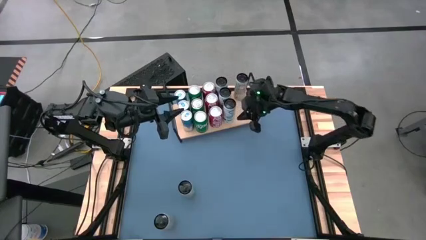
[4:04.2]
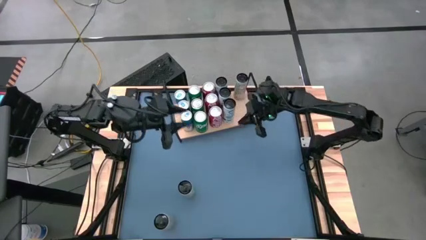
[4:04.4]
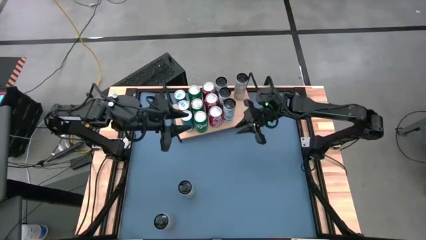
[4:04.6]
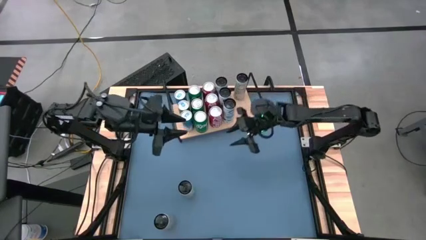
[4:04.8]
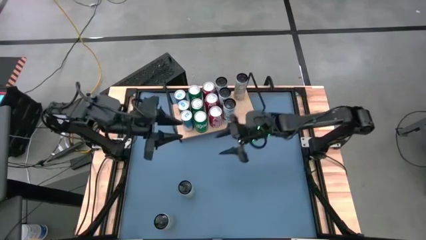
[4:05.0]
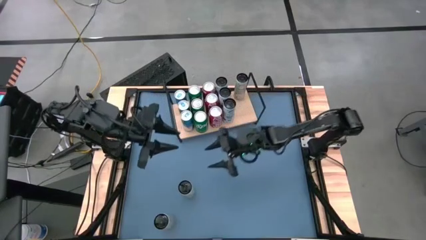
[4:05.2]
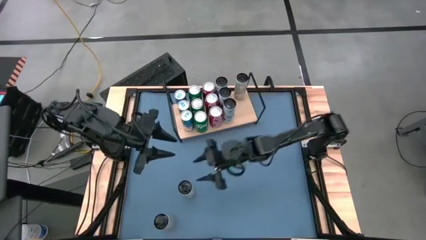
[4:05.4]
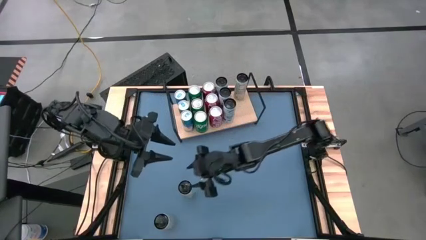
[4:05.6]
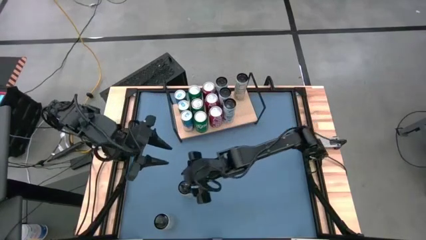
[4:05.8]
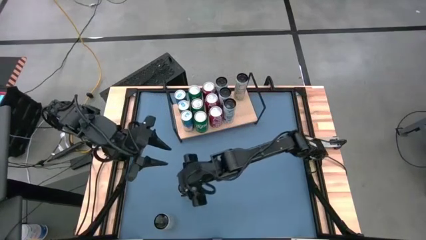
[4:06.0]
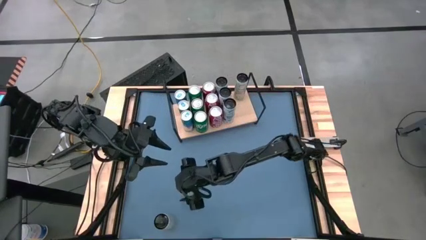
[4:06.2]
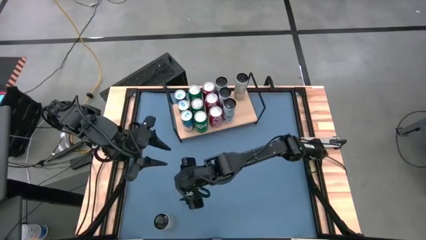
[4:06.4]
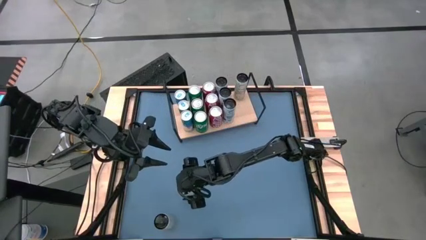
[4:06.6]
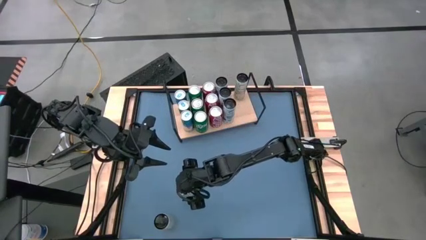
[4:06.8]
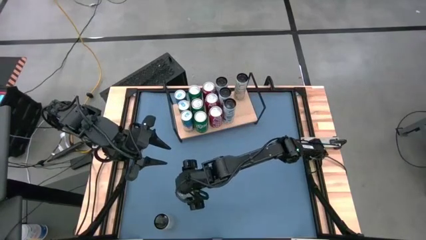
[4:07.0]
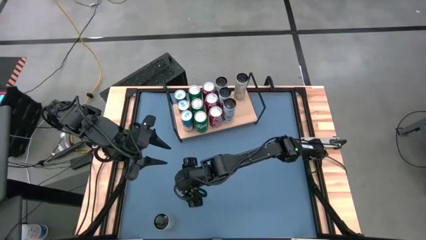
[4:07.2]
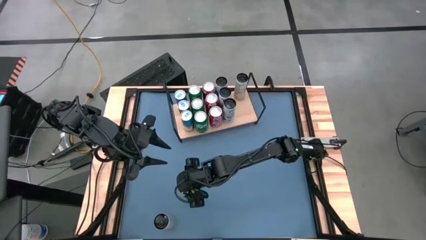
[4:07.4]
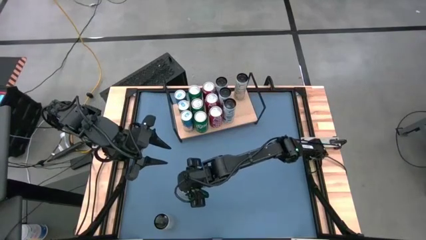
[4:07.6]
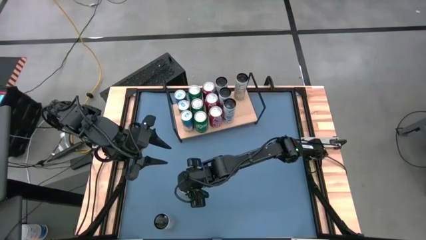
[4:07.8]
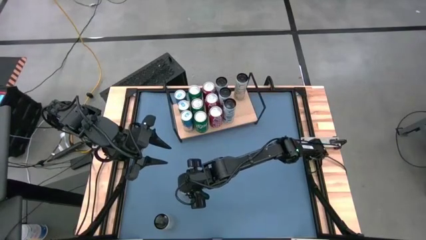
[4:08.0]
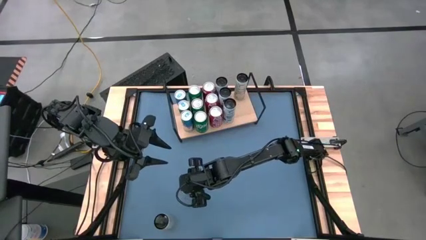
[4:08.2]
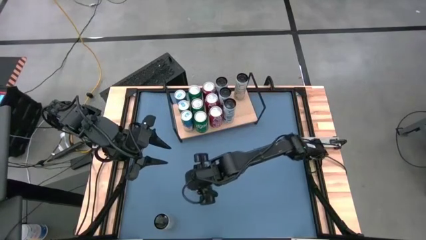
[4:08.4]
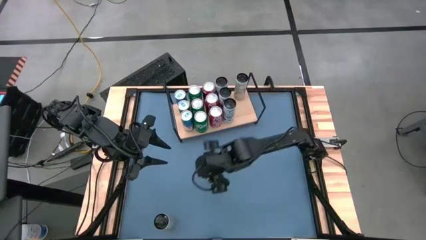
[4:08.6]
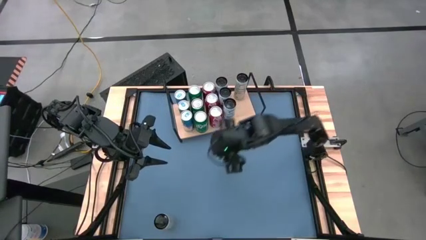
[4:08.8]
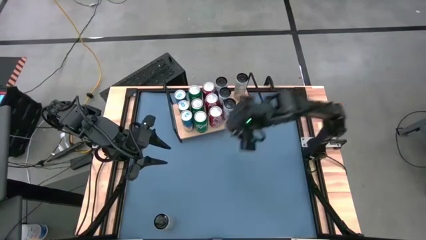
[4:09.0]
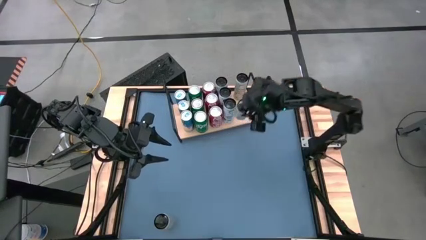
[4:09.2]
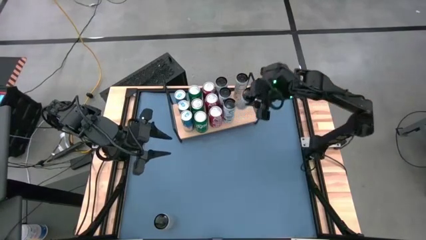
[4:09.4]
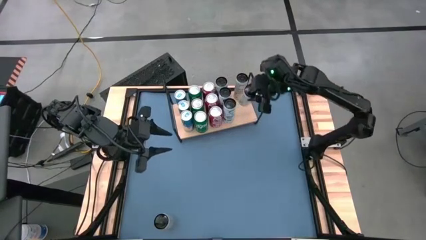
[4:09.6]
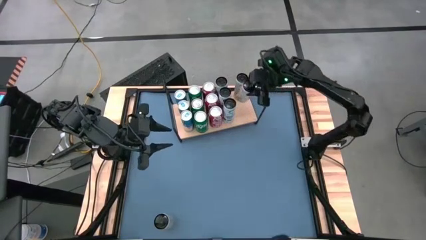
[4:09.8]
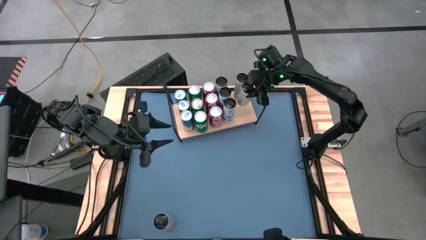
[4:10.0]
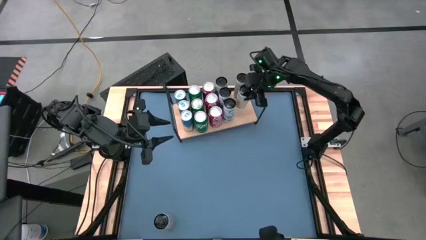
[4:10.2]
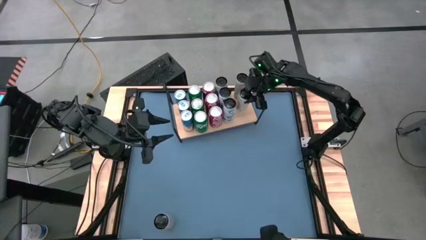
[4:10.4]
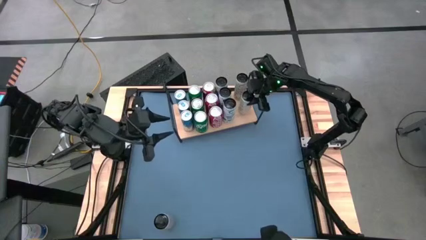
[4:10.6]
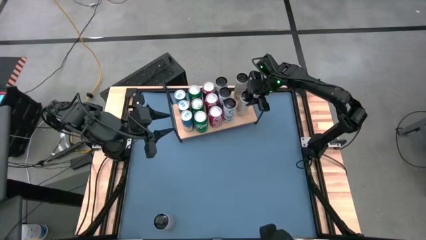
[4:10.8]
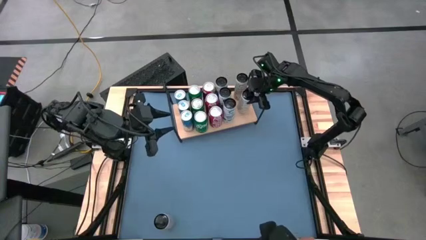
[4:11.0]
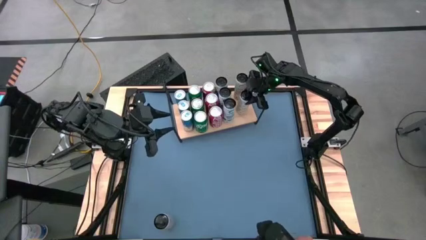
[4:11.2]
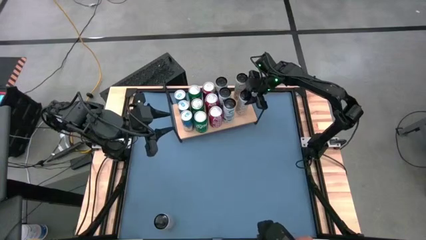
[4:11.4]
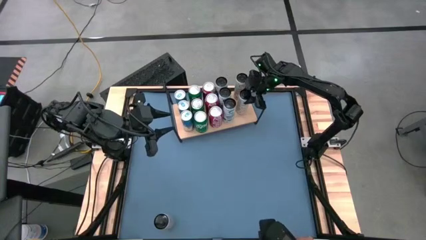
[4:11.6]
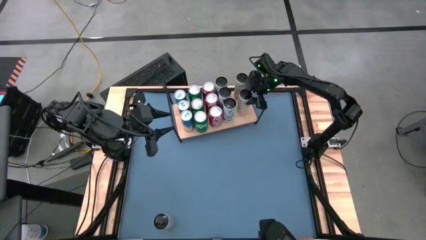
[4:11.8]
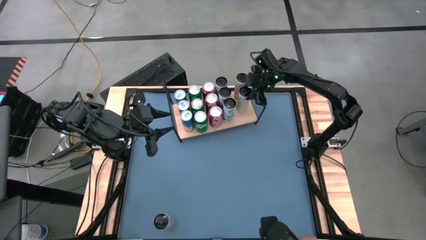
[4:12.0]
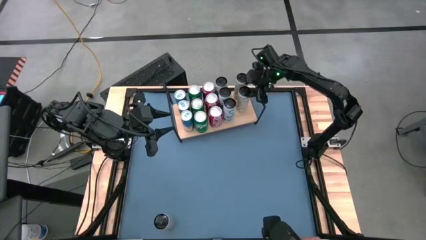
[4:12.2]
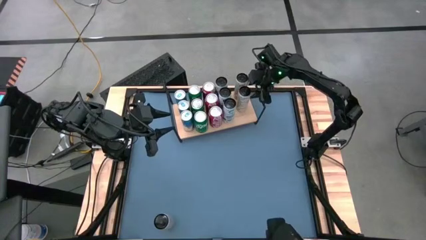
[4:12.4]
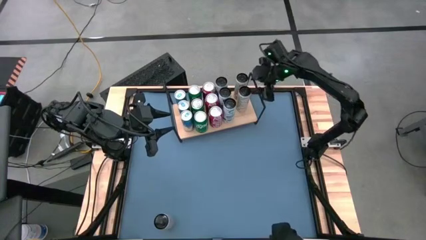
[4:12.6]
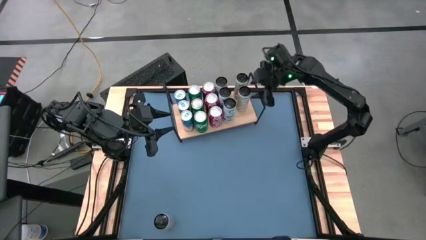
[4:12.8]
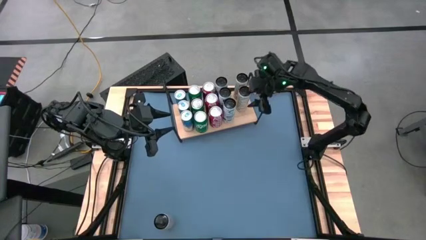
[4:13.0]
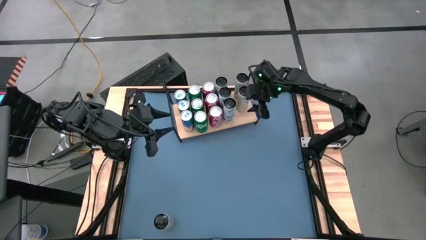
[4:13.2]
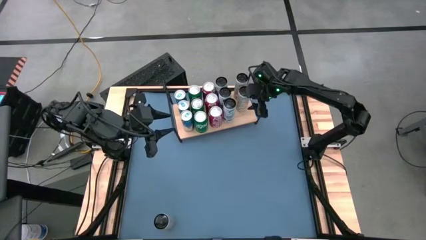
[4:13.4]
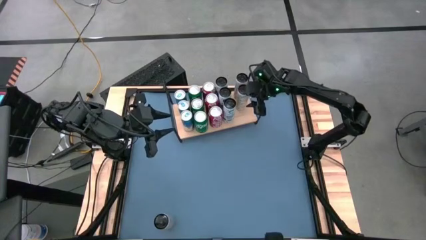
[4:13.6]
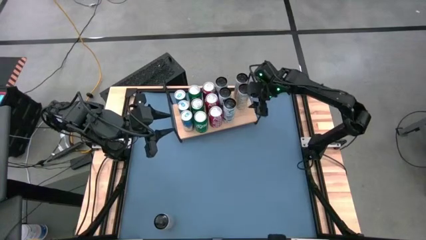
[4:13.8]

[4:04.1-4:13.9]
Task: Place canned beverage on shelf
Put the top white yellow soda can on the shelf aligned with the other white yellow soda can
